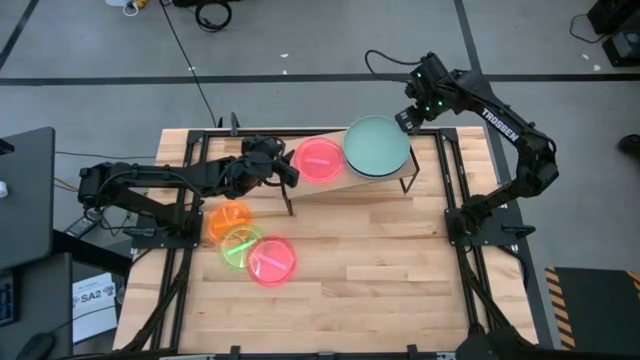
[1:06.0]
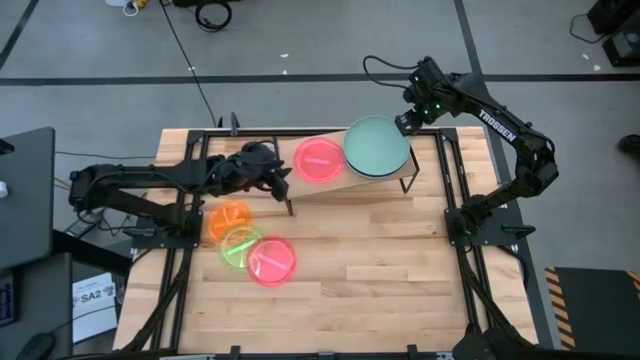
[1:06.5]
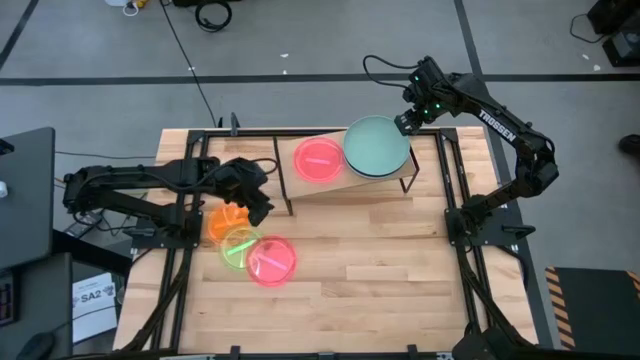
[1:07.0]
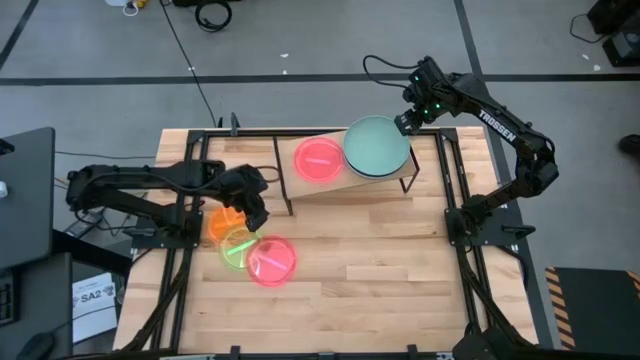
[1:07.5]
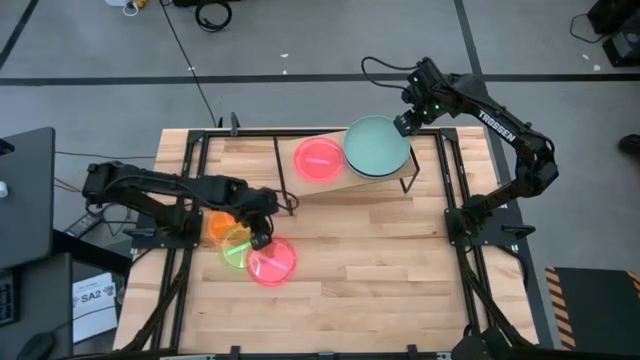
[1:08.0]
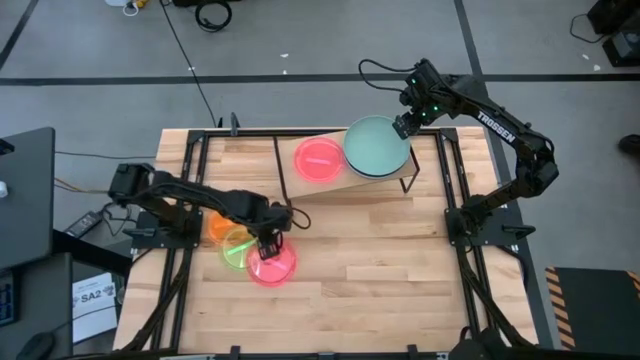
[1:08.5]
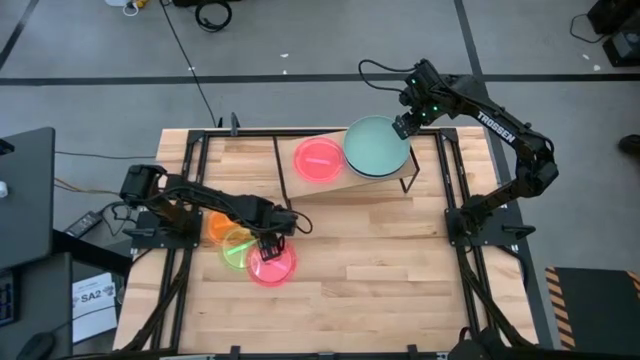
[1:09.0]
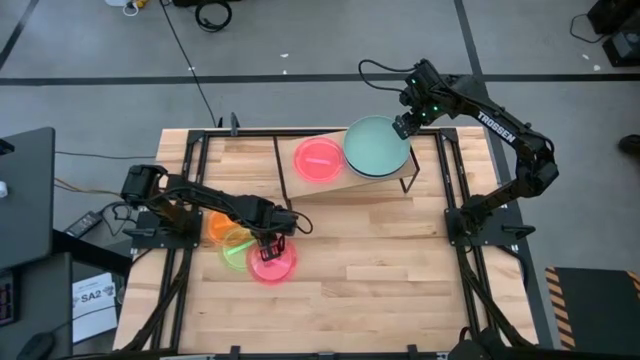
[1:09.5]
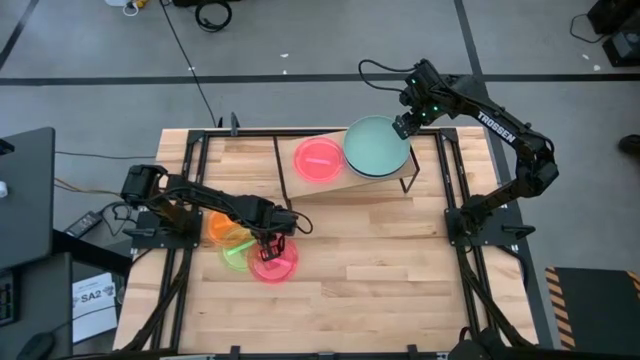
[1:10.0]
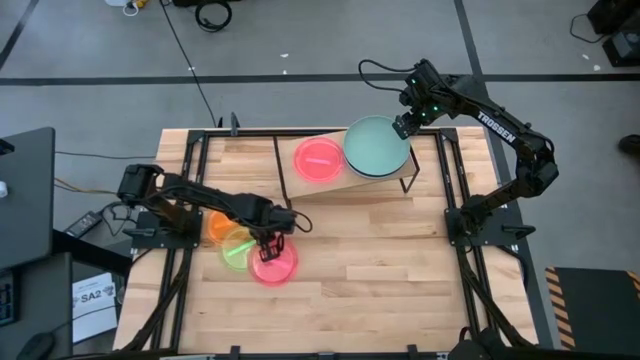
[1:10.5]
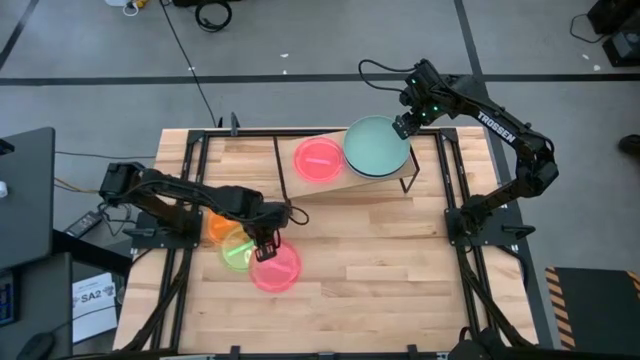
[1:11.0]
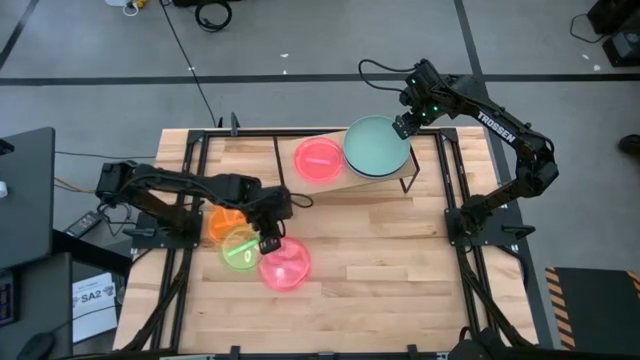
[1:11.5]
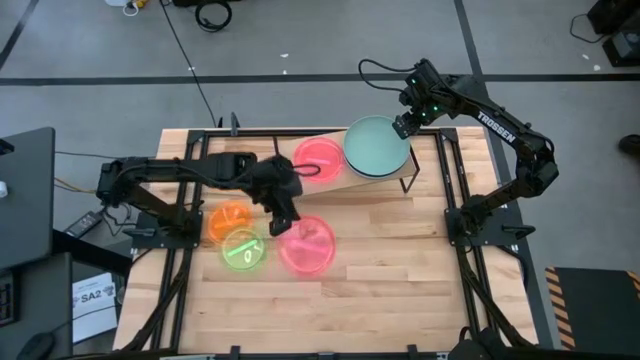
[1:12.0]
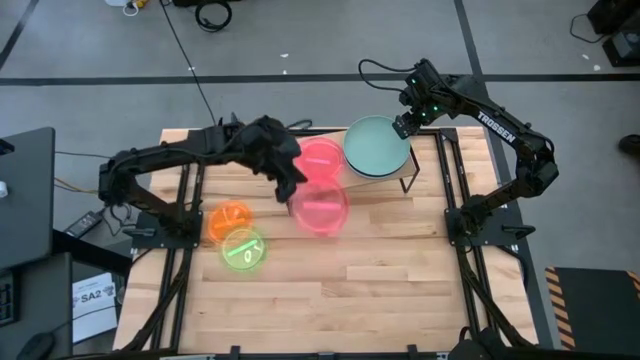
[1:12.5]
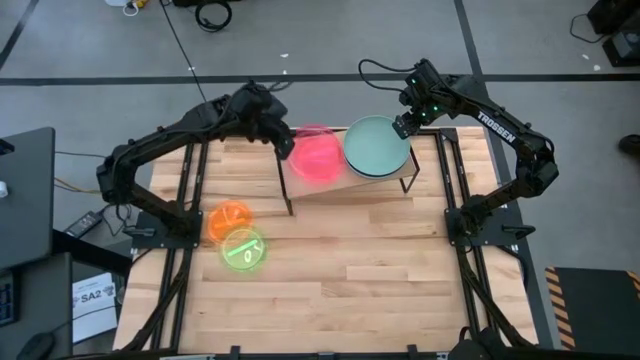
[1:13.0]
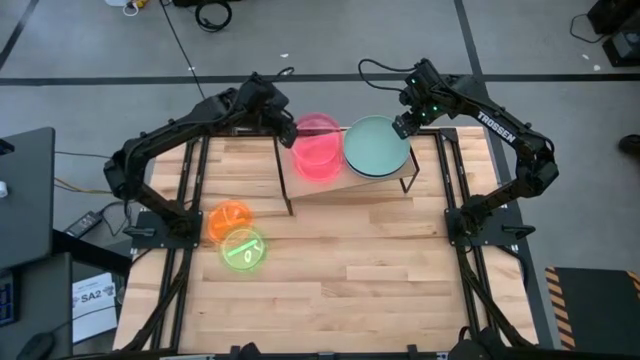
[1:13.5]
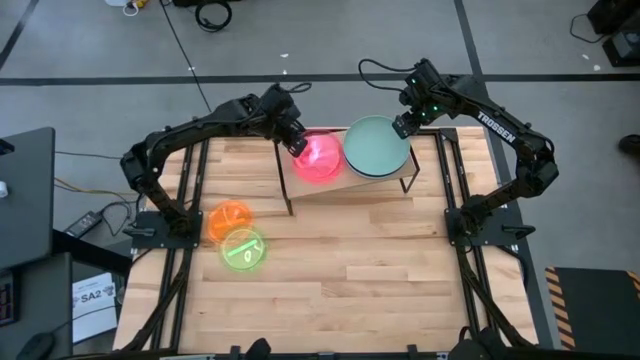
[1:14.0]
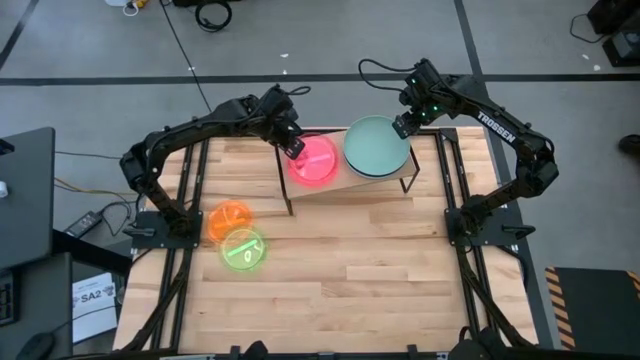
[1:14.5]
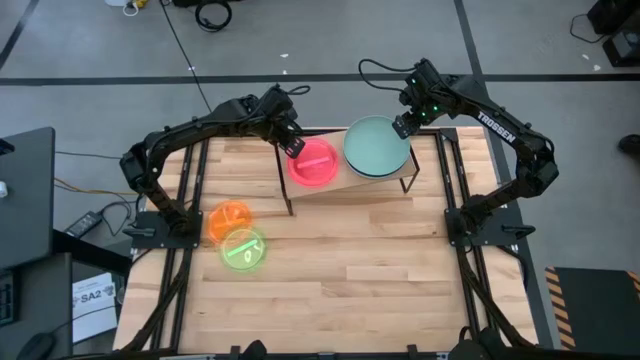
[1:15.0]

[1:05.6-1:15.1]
Task: Place and stack plates onto a shelf
Stack the small pink plate on top of the small pink plate on the shelf

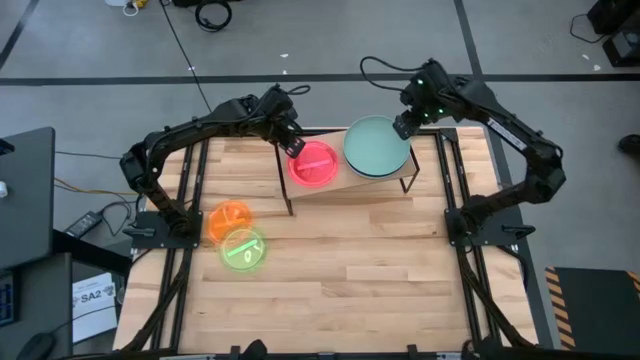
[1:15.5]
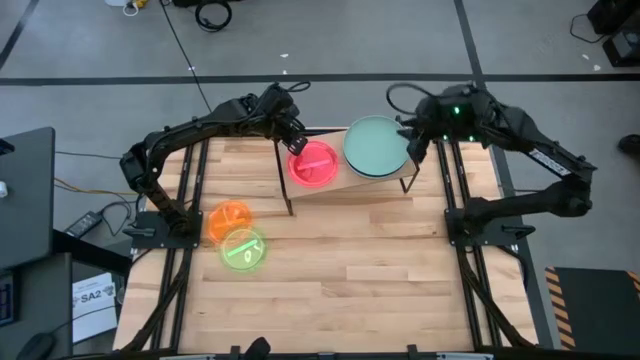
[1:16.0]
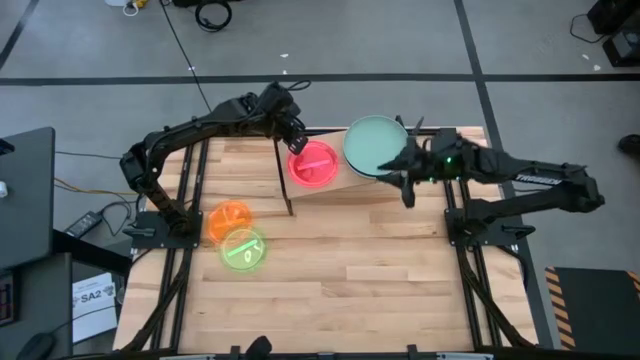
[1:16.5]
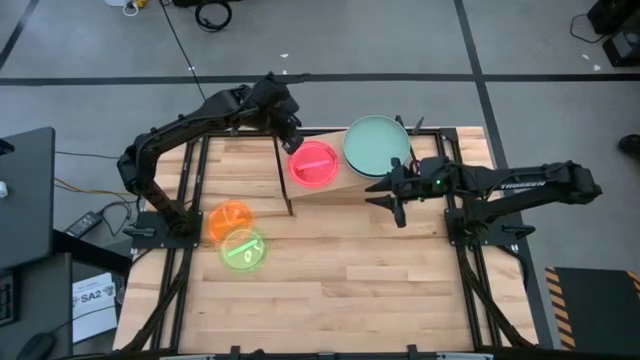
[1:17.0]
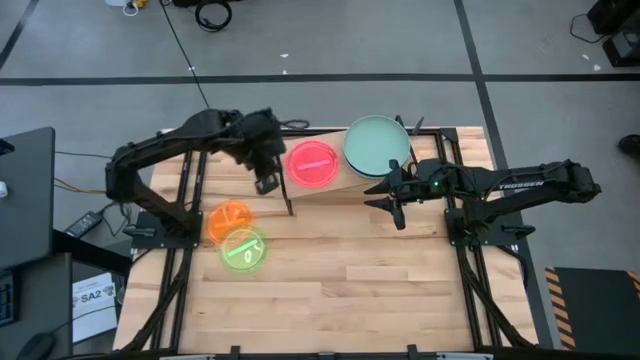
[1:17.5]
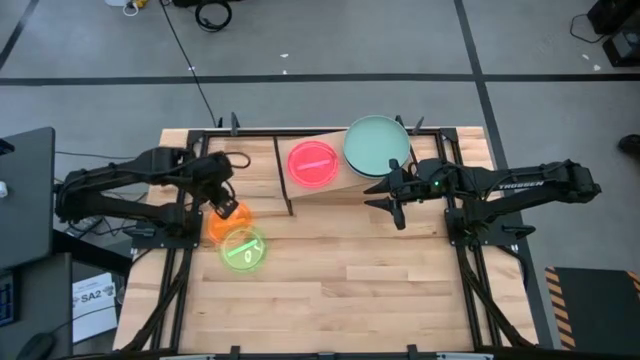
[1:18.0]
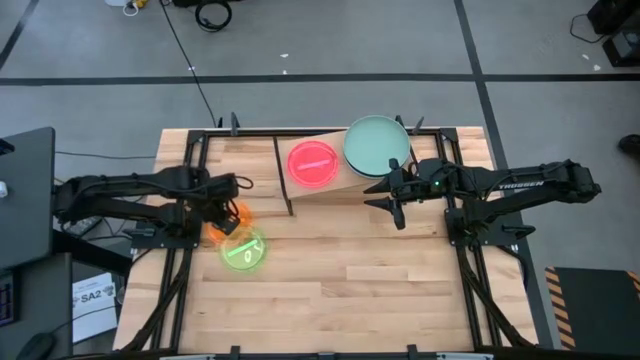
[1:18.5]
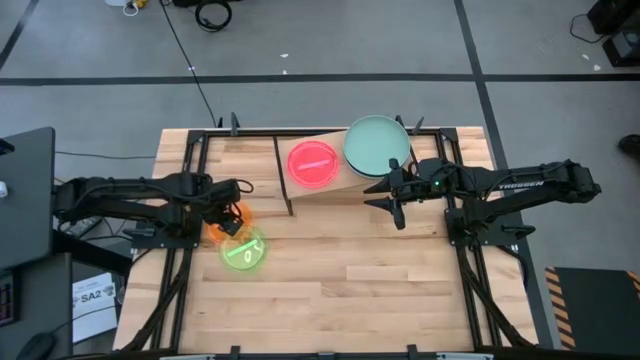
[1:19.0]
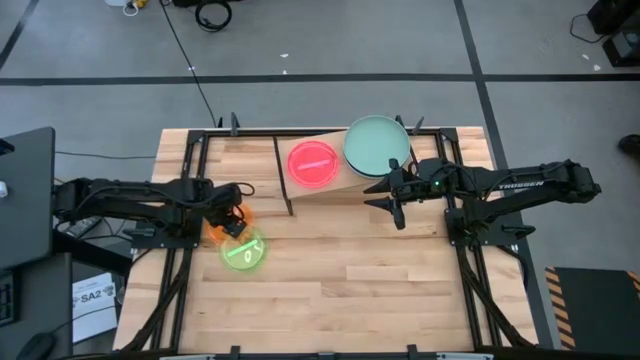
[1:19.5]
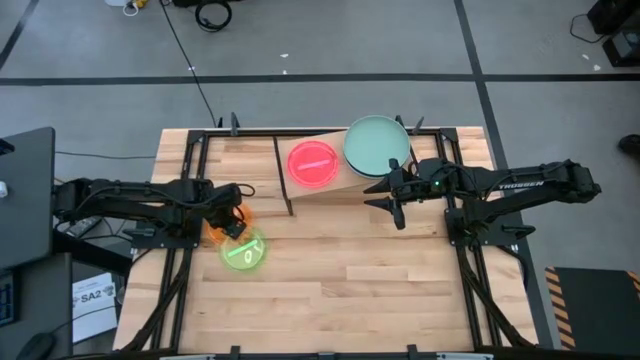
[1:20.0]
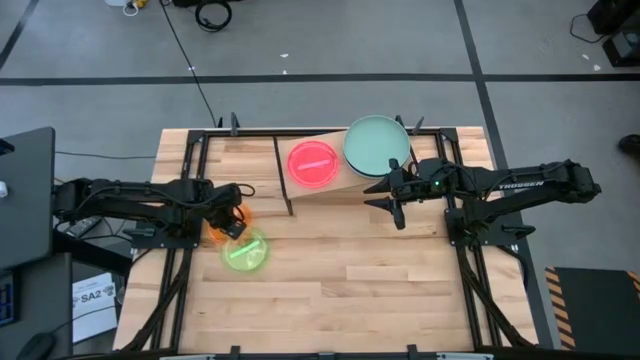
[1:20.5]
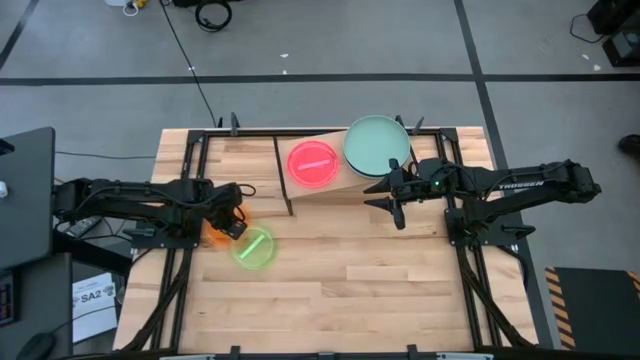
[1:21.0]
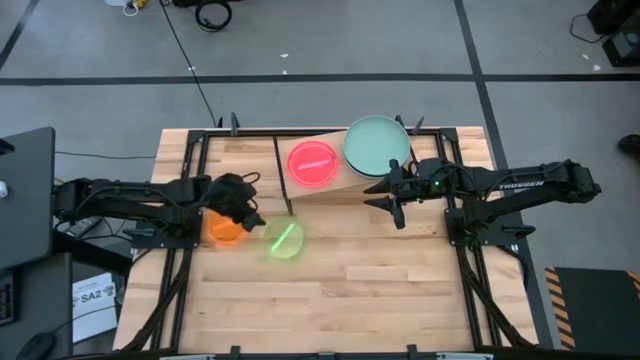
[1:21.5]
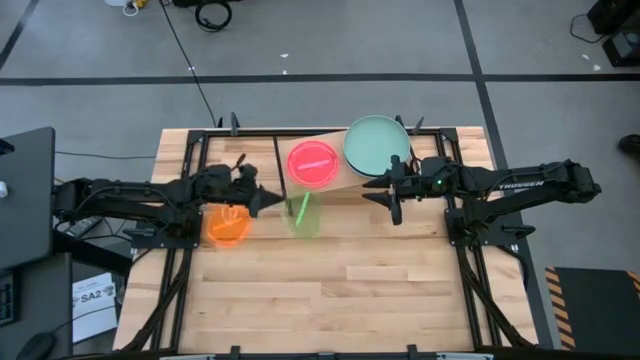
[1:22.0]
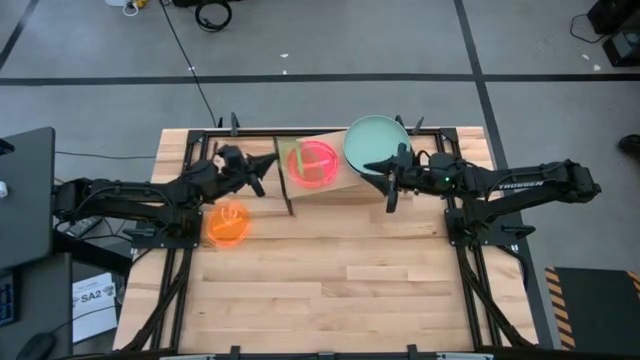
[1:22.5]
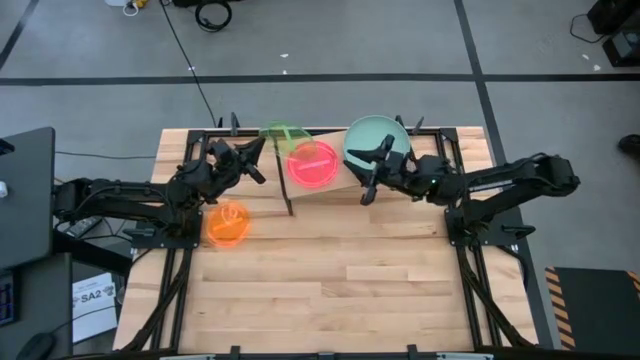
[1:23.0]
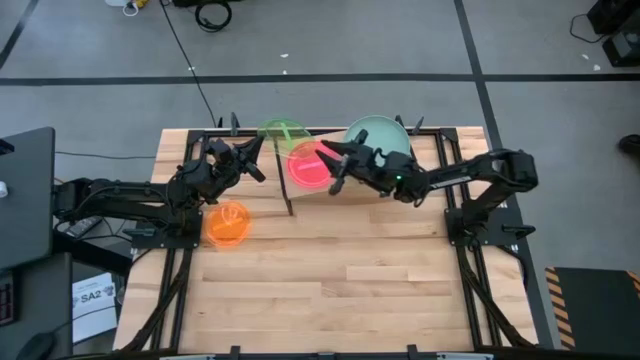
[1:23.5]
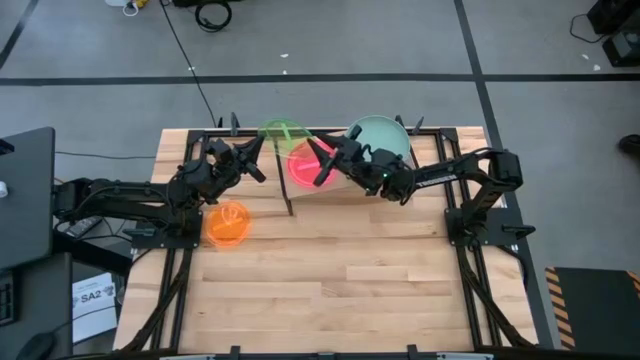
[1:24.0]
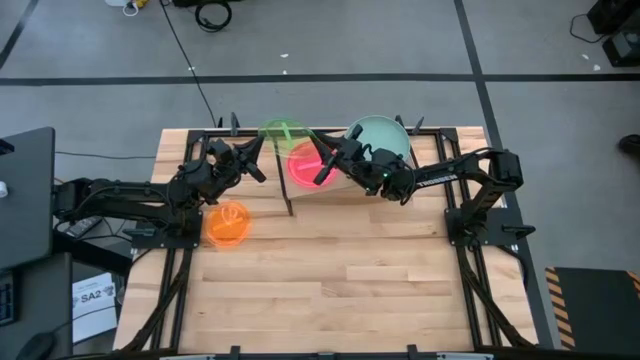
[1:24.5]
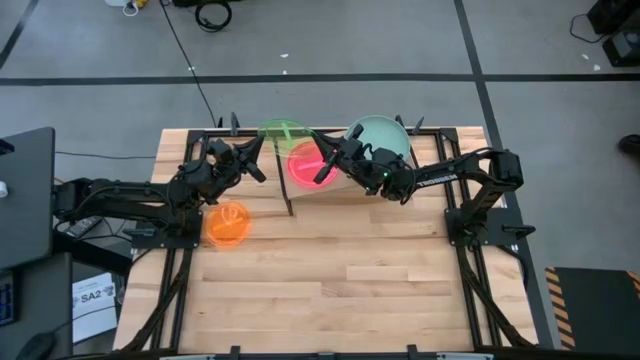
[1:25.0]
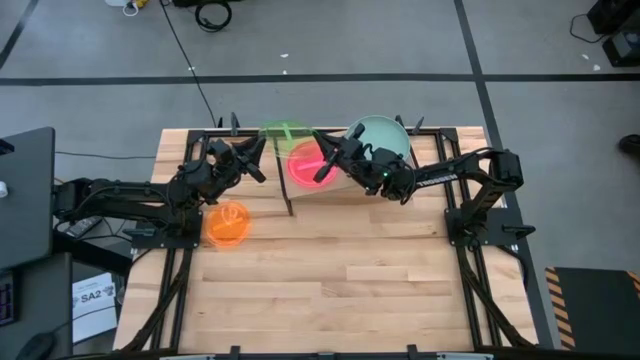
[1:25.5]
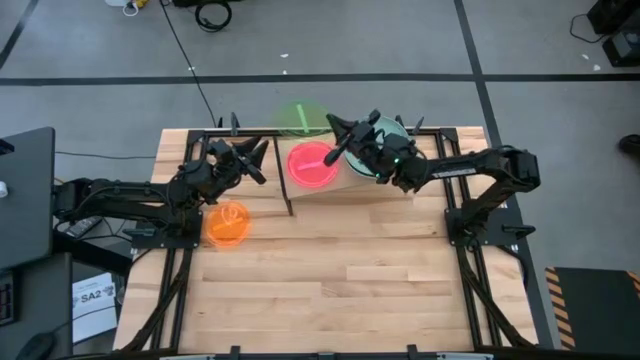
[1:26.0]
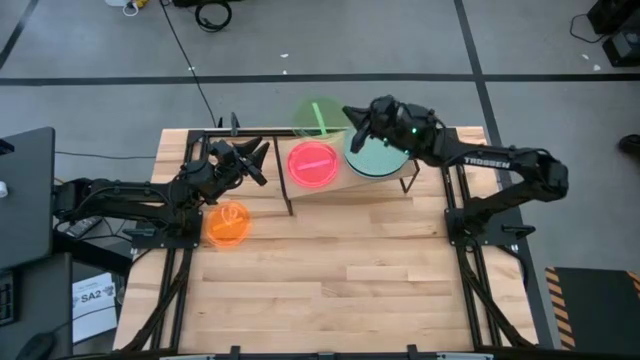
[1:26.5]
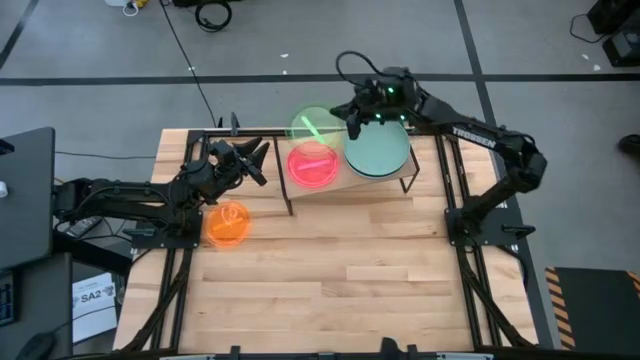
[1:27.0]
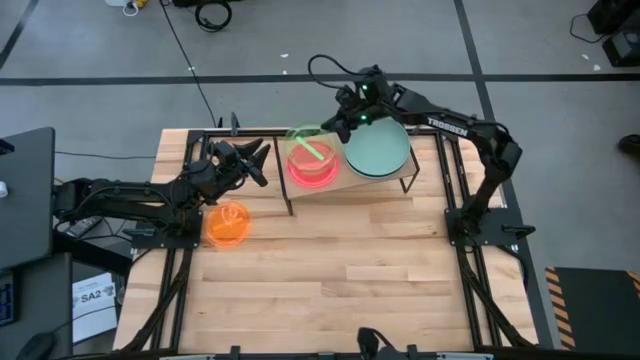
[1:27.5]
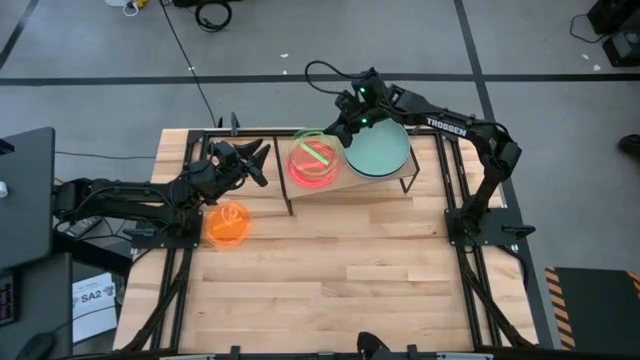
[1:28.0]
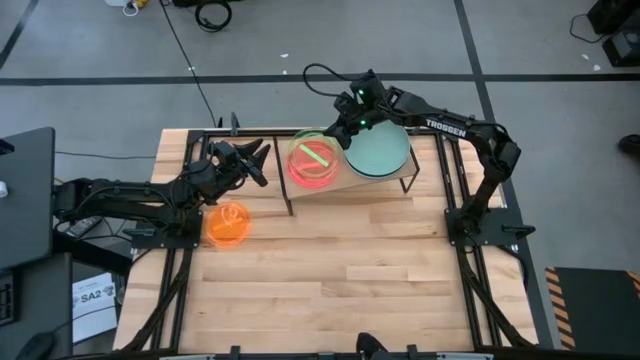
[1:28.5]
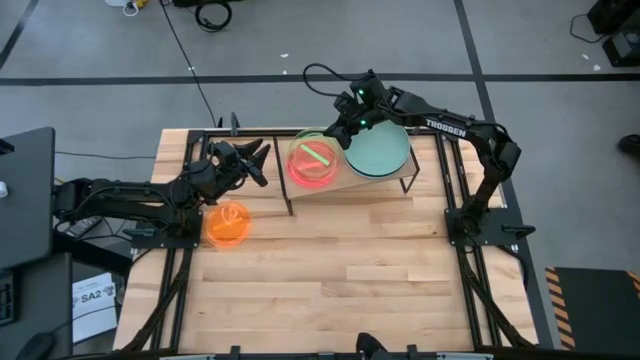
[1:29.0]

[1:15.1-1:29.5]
Stack the small green plate on top of the small pink plate on the shelf
